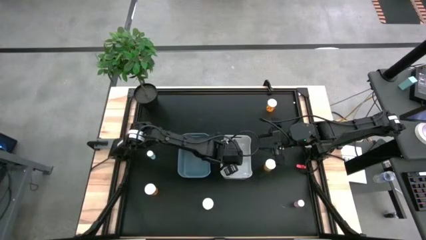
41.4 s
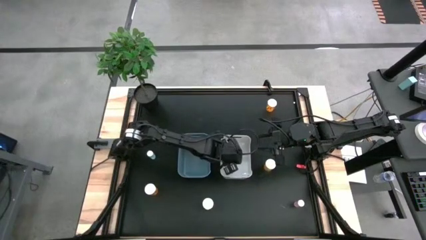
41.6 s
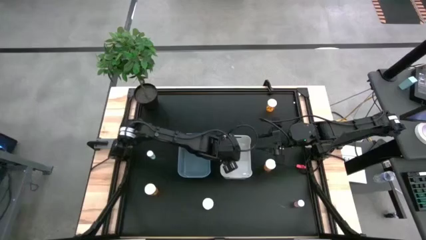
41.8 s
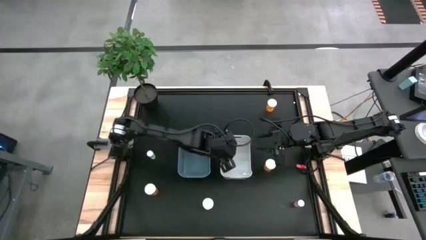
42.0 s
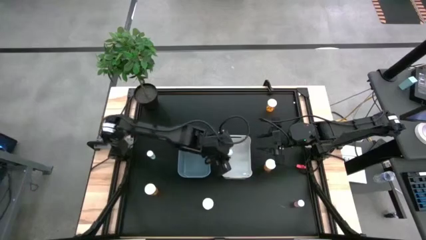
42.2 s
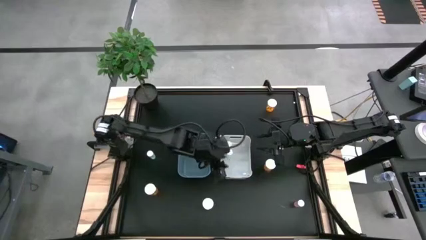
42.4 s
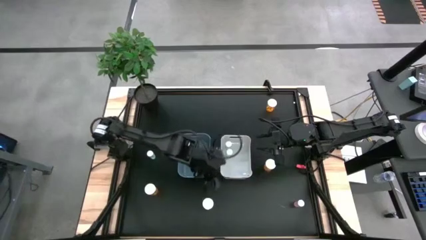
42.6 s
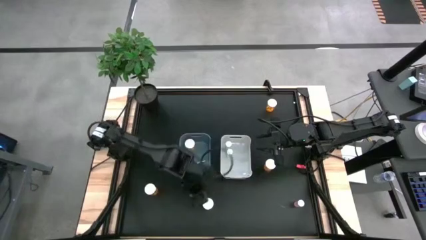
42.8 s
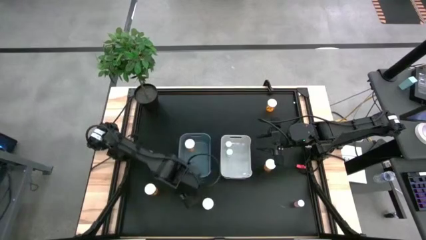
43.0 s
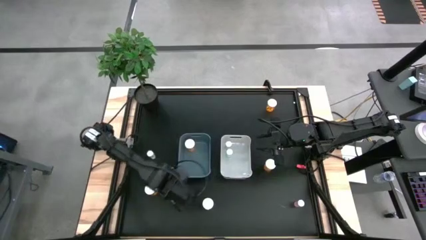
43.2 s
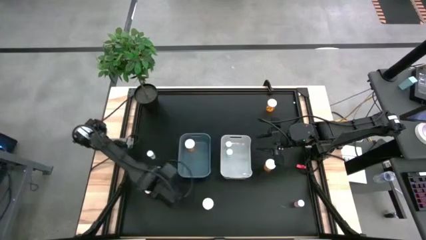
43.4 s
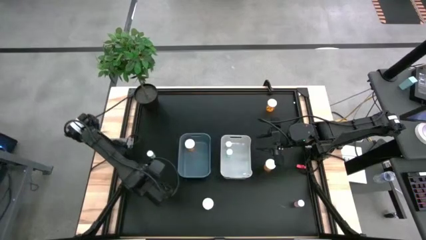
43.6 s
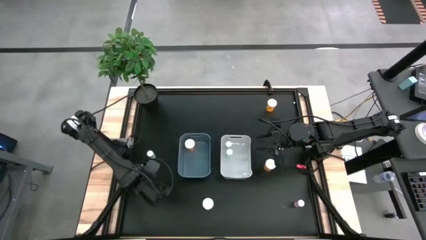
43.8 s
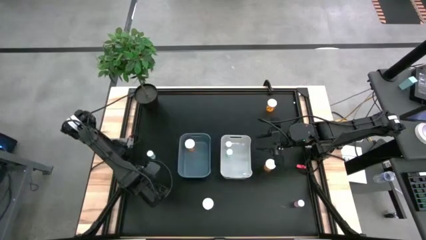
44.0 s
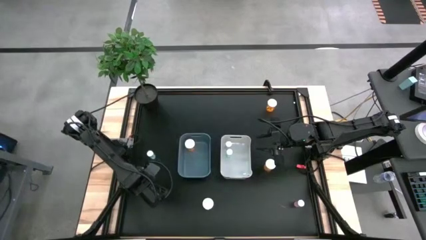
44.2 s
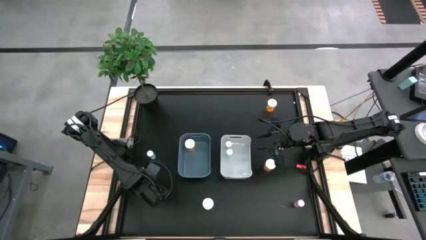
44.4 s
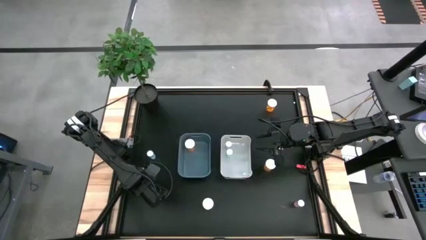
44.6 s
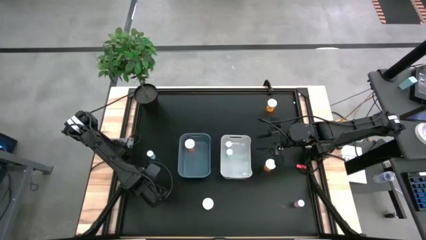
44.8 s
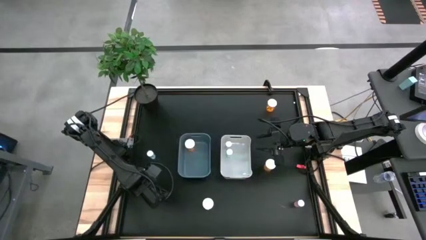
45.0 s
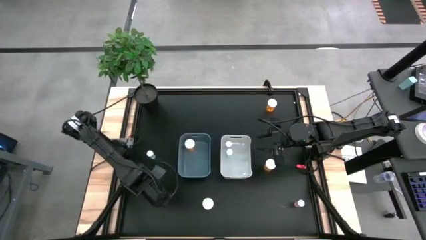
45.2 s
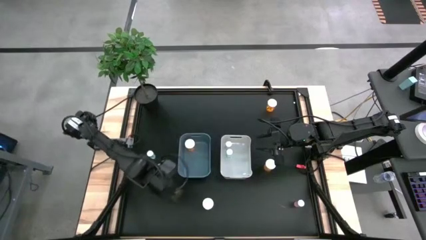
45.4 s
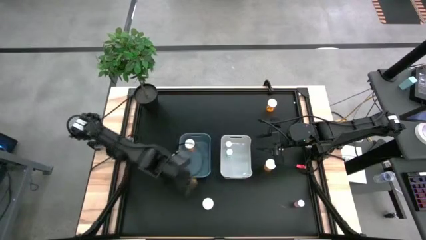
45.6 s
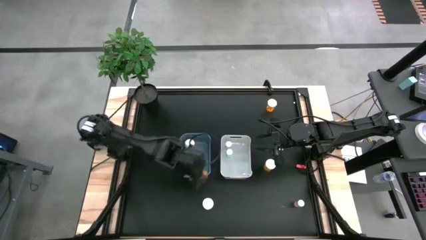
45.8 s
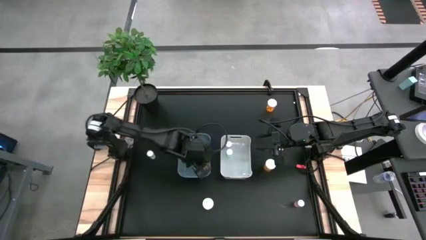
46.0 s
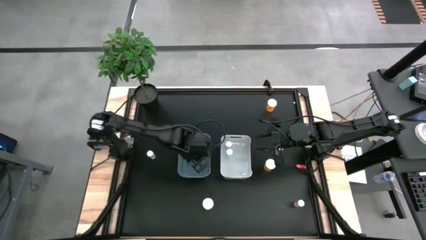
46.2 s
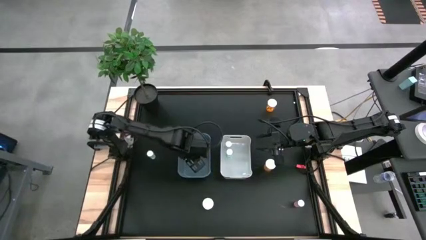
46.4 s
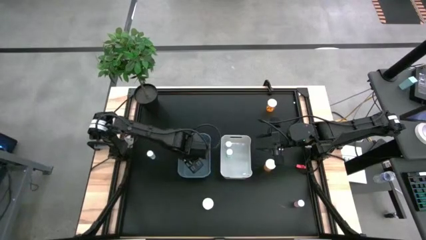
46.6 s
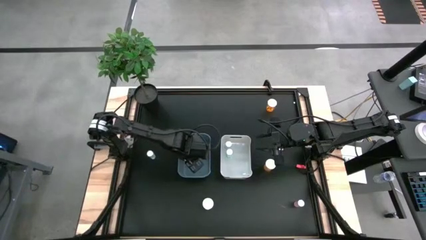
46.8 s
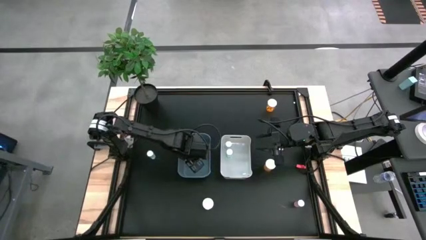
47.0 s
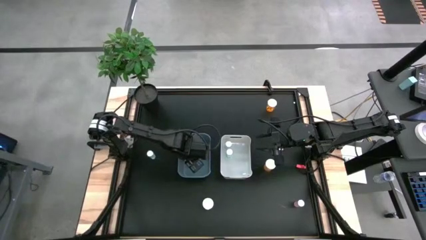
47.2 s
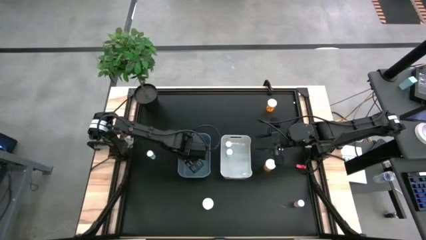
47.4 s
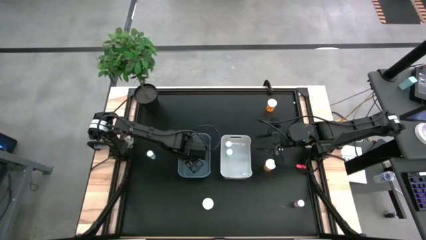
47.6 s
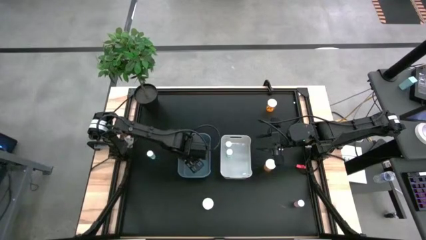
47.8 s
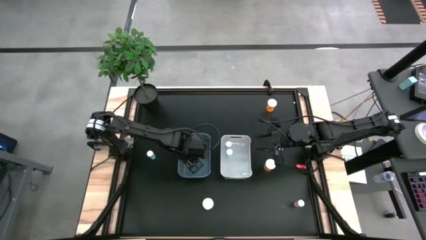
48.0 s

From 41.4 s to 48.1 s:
Task: Pick and place medicine bottles into bin by pill shape (circle, oval)
Put the orange capsule bottle into the blue bin

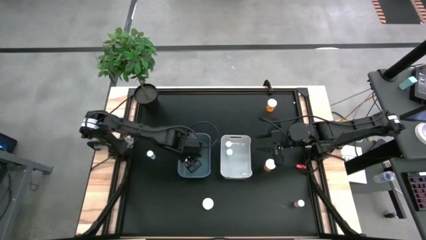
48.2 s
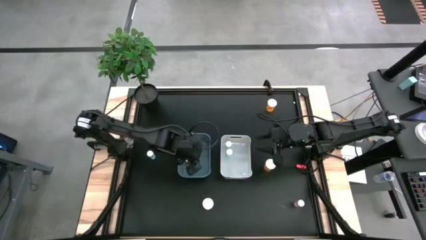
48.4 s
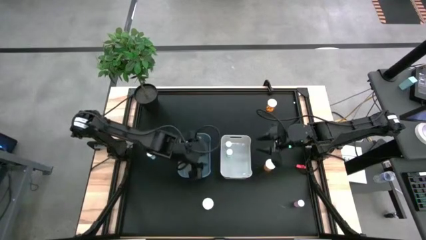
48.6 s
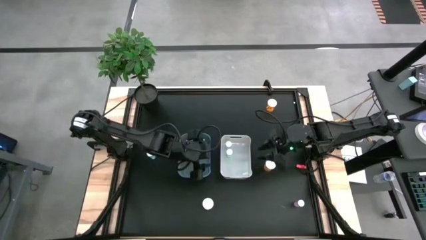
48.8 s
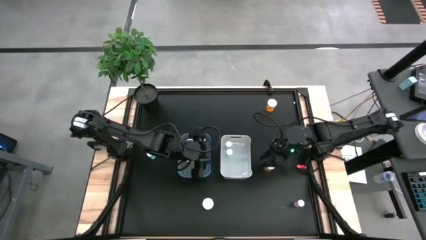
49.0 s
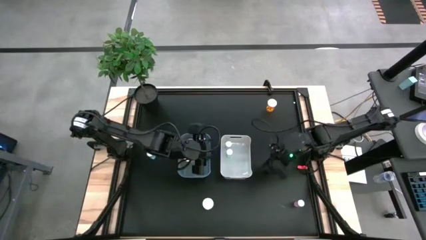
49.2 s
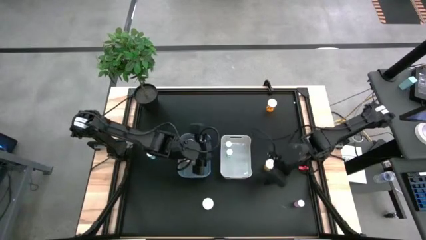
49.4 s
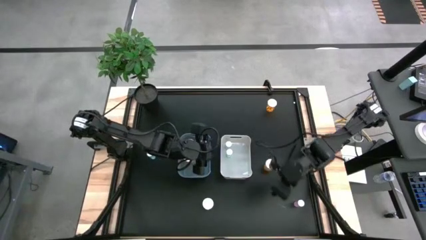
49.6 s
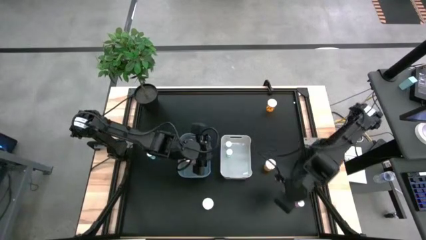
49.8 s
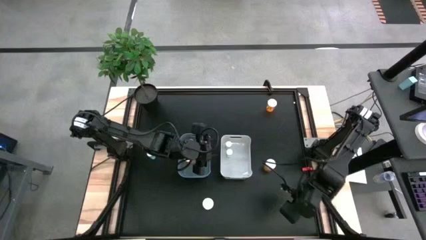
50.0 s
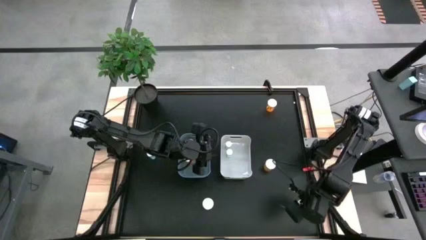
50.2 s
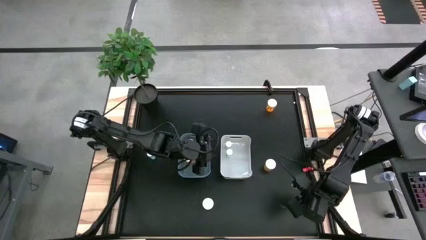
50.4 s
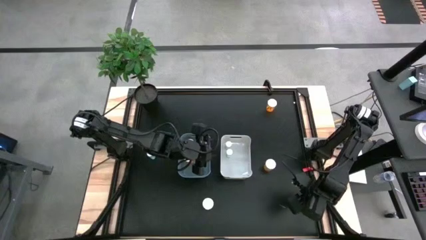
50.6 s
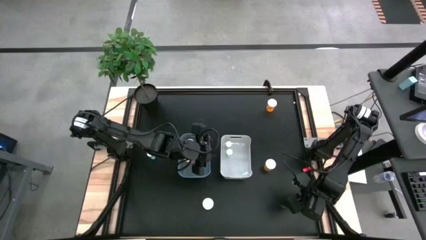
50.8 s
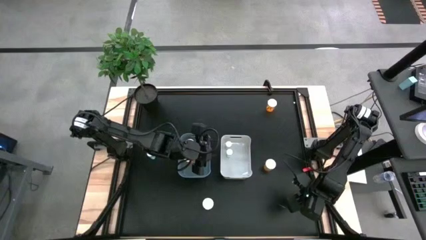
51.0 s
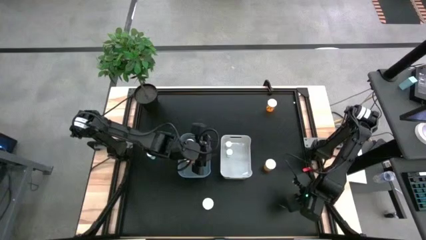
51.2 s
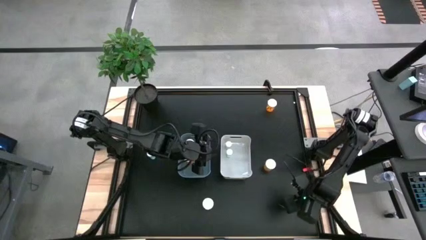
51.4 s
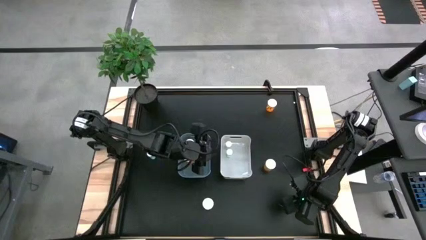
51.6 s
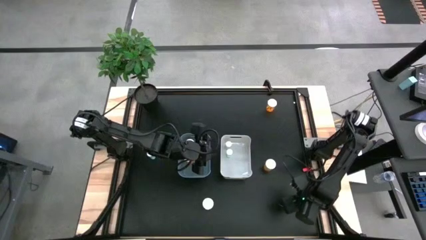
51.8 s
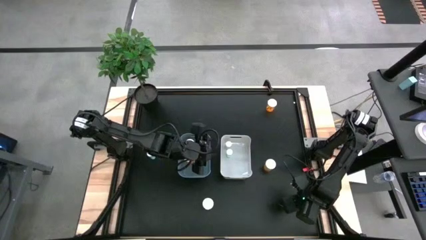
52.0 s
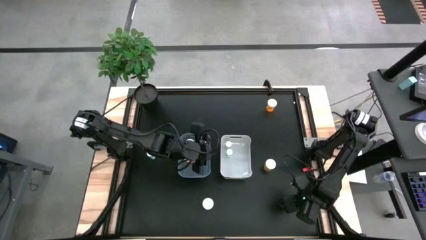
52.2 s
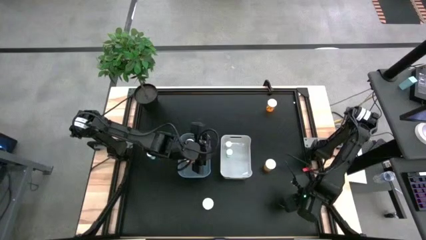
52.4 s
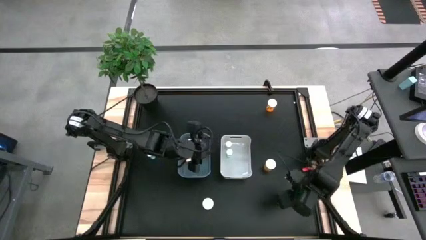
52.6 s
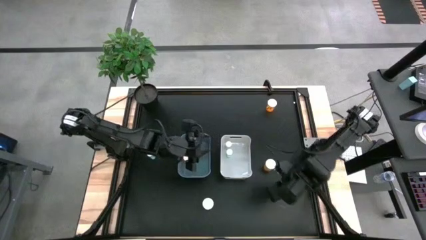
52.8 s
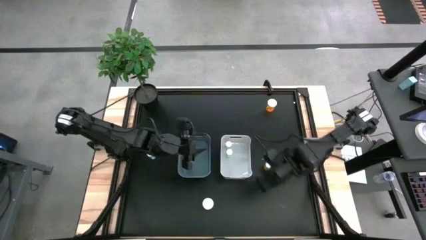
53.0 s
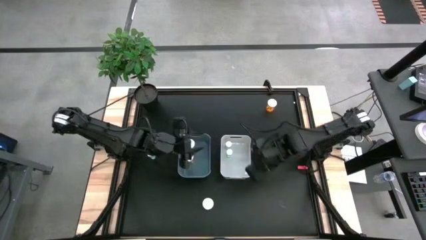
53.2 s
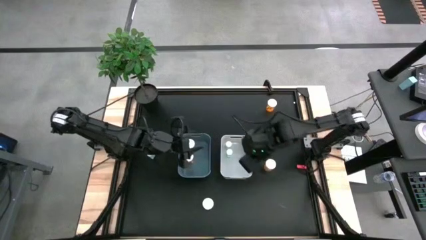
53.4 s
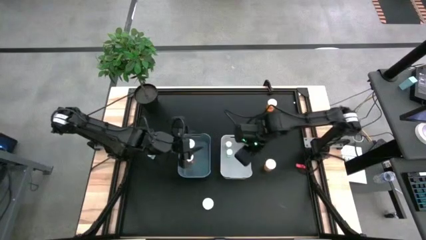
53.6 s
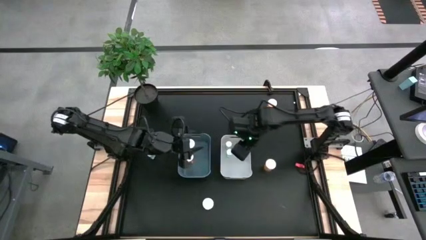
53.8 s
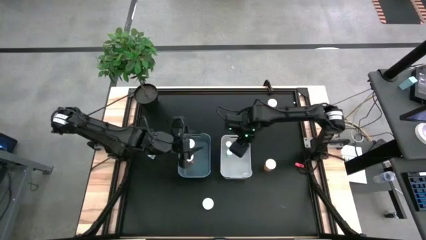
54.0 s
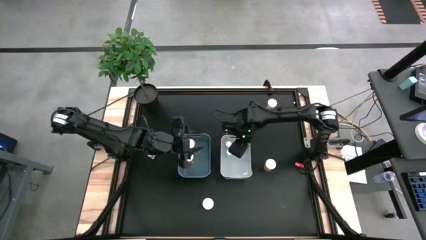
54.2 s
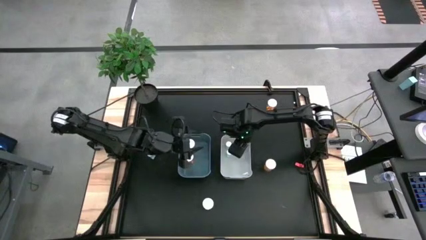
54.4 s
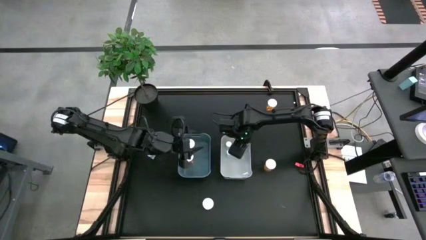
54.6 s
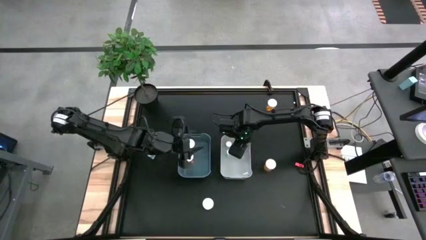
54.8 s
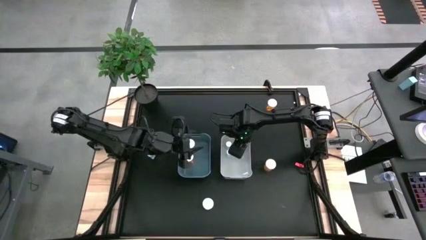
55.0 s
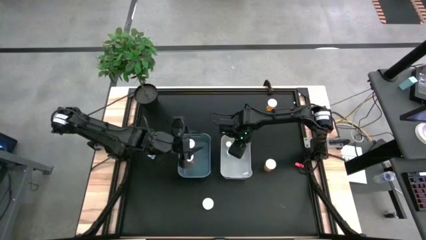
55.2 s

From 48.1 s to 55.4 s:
Put the pink tablet bottle into the white bin

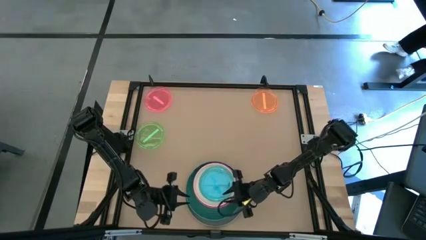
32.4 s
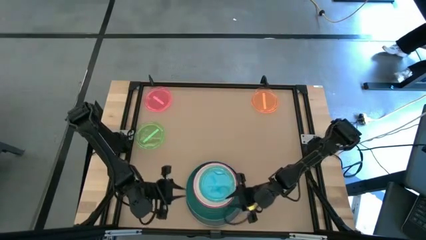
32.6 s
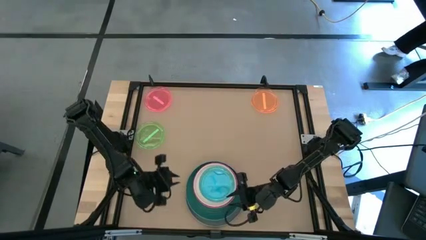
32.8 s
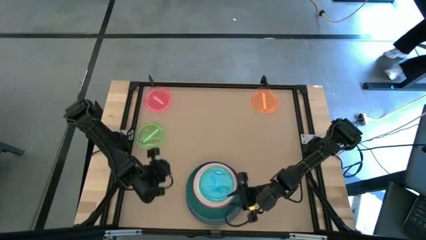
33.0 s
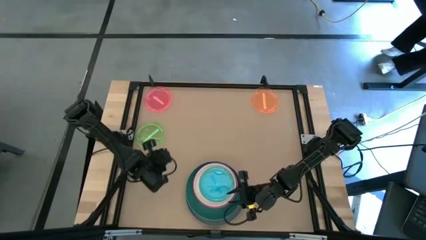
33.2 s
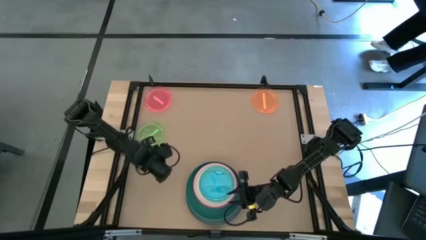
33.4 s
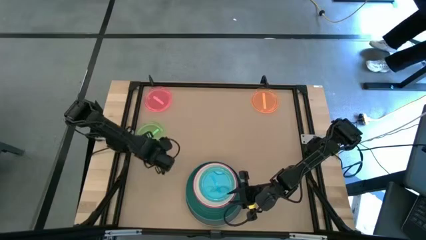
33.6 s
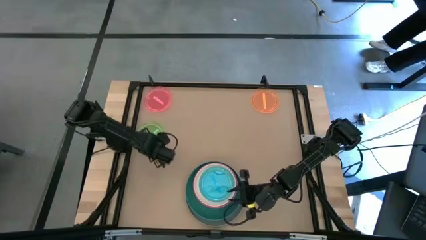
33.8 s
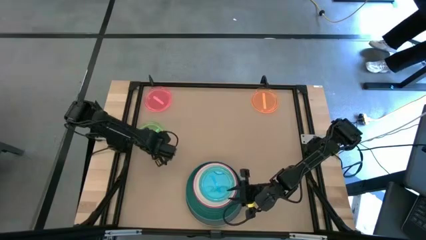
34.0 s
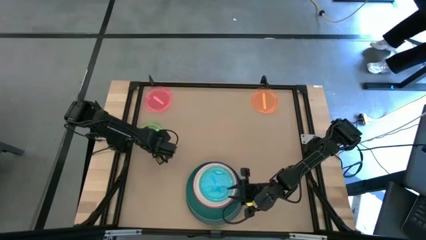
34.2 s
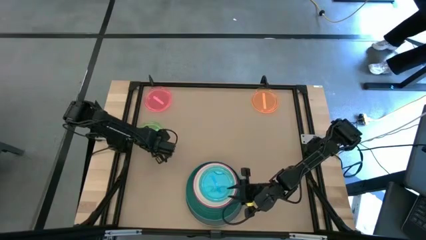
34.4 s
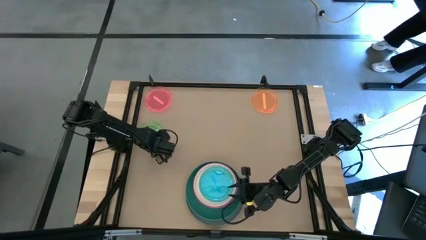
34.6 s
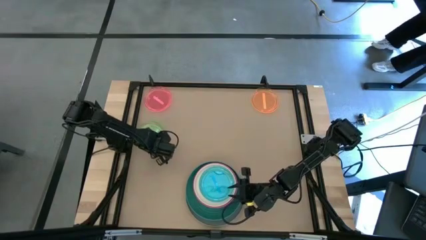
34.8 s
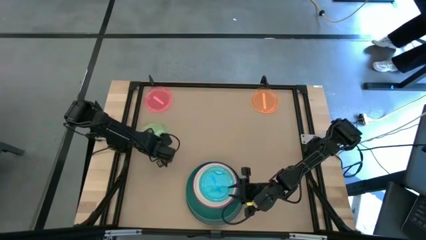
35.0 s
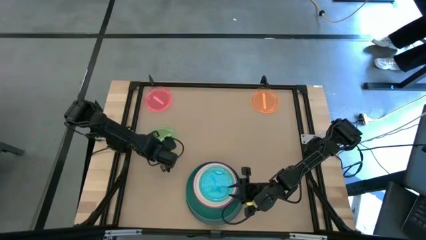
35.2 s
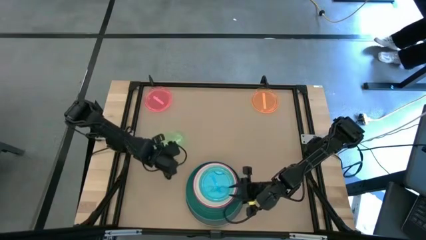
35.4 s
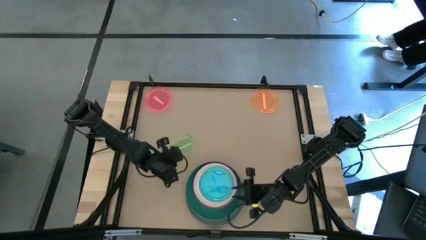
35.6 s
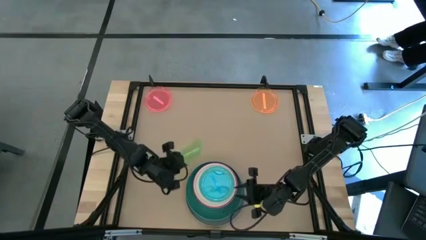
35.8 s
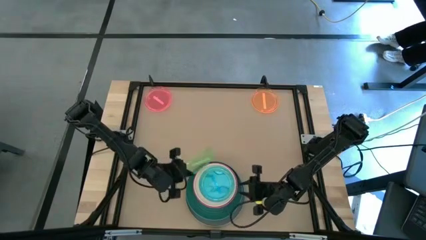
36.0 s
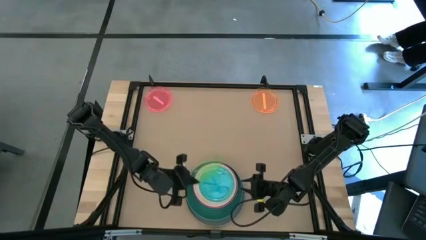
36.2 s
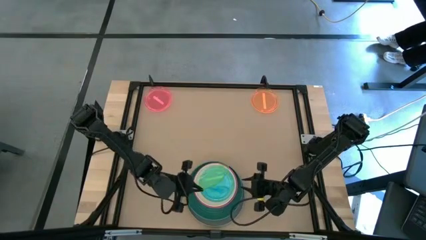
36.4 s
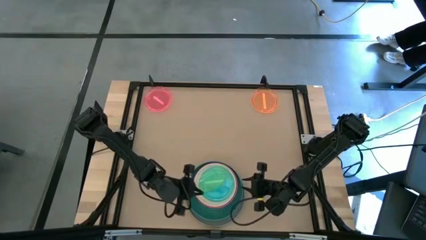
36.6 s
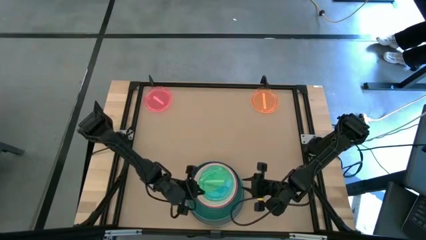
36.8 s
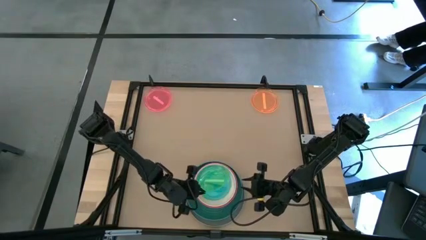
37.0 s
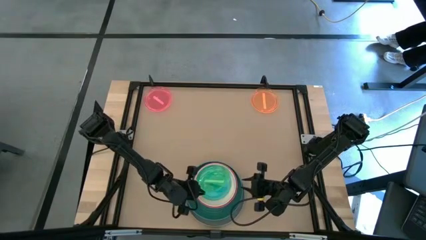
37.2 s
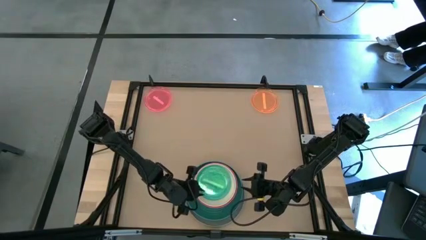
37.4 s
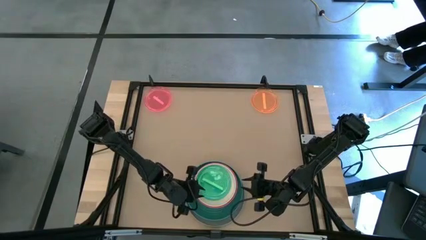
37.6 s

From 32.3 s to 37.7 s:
Task: Stack plastic plates
Stack the transparent green plate on top of the transparent blue plate
